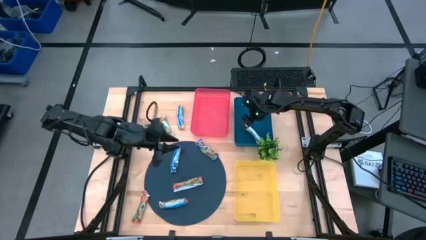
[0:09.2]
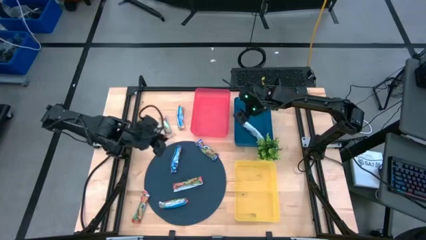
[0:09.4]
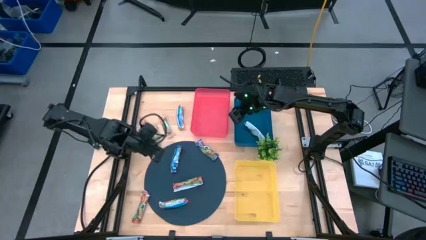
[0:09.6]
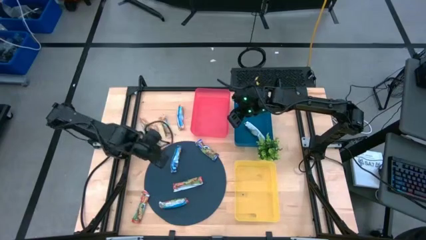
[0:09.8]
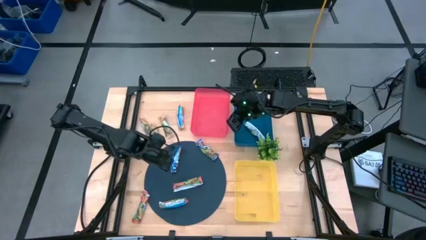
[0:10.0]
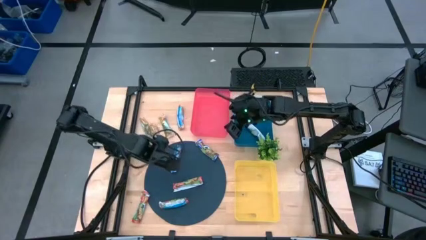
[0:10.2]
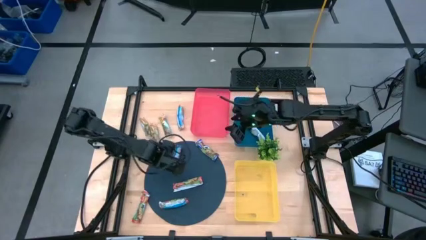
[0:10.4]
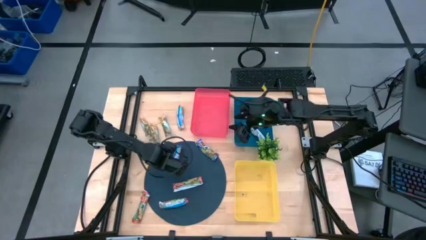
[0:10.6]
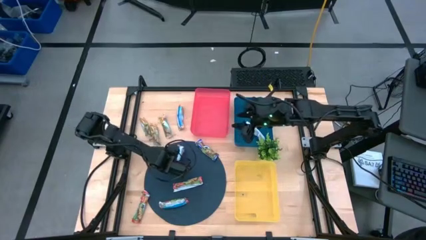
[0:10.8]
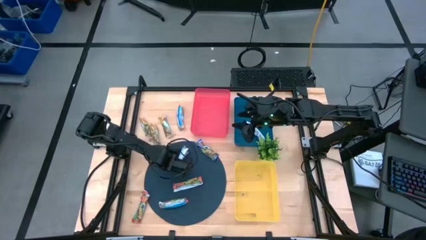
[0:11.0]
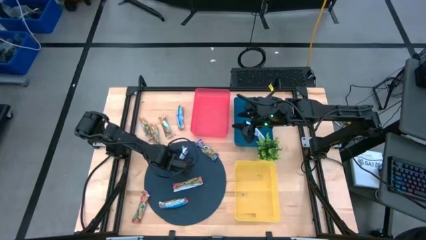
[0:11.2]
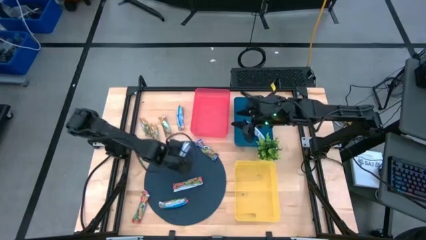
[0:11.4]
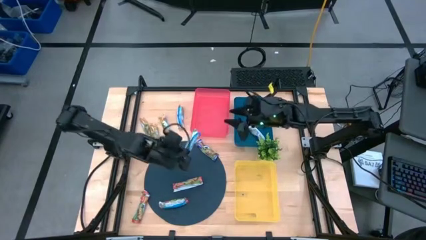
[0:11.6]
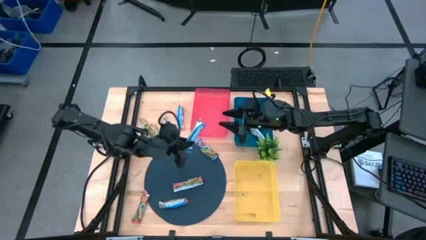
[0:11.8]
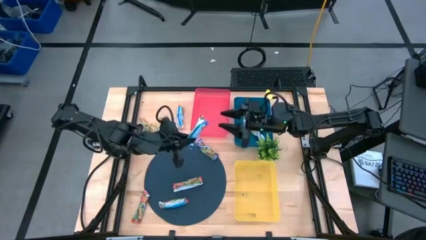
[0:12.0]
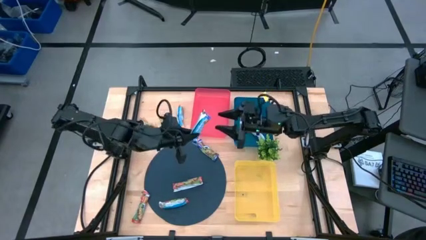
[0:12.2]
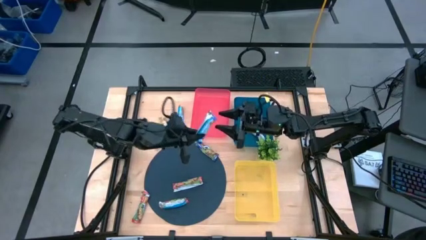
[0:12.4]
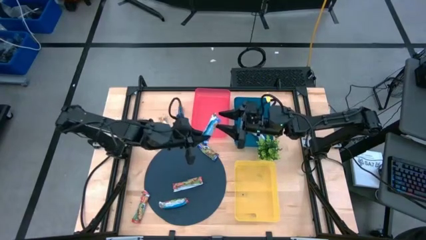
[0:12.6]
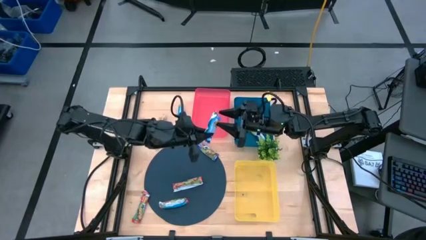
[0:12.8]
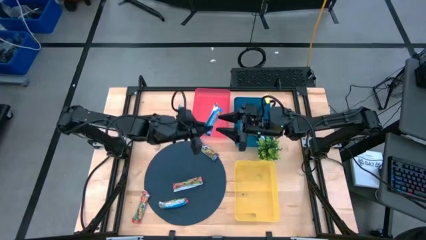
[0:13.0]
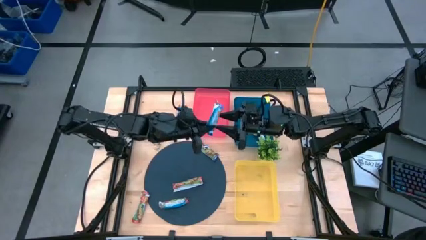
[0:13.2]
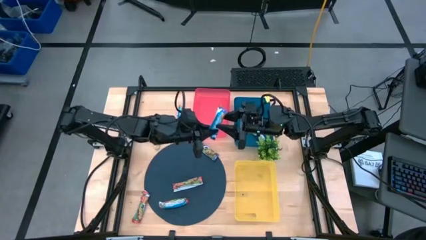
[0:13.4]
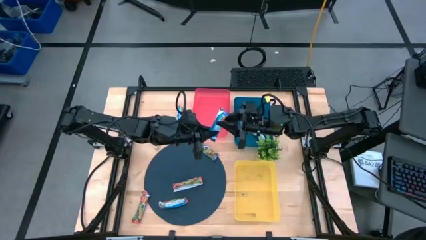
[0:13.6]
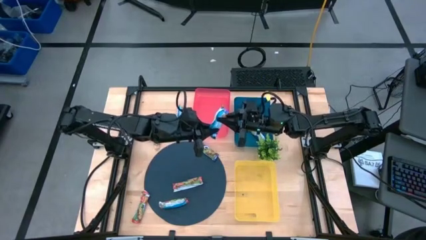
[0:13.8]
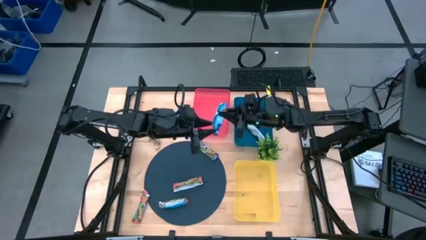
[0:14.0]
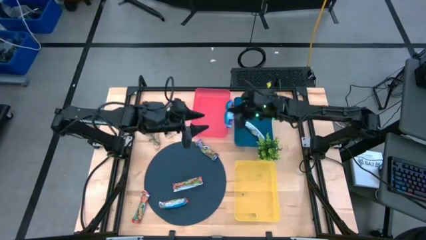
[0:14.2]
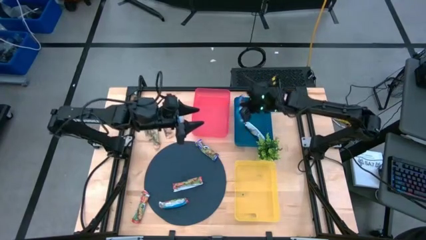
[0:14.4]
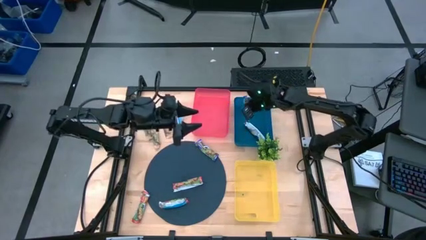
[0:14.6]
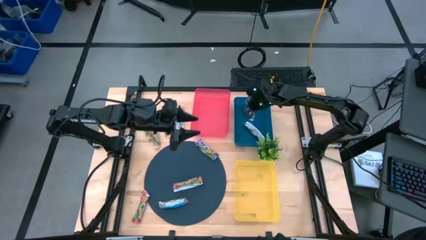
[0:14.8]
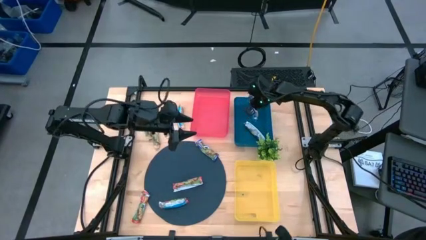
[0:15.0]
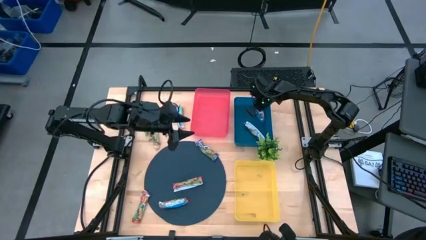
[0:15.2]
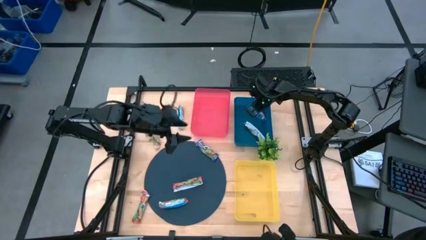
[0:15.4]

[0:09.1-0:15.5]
Task: Pick and place Granola Bars by type
Put the blue granola bar into the blue bin

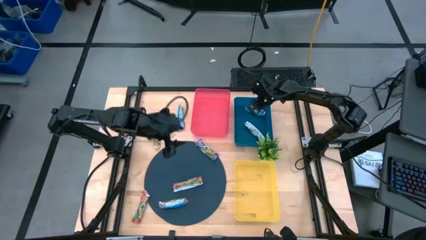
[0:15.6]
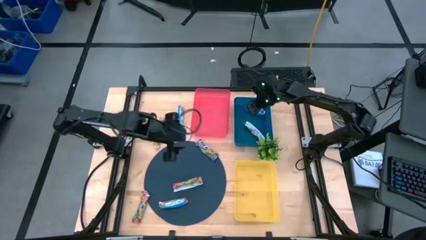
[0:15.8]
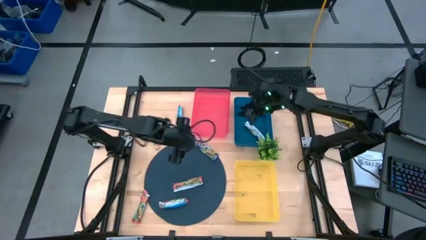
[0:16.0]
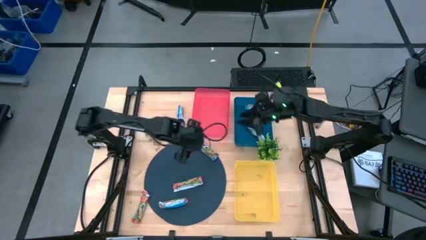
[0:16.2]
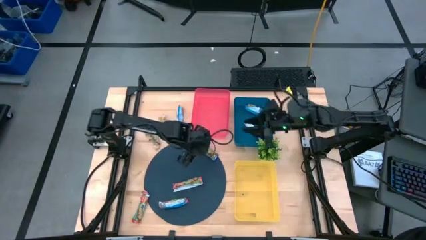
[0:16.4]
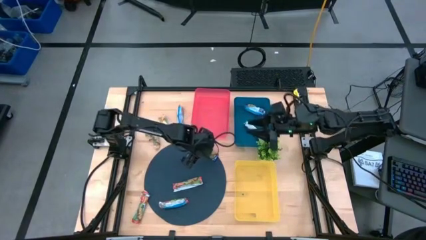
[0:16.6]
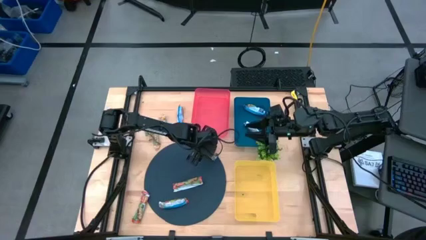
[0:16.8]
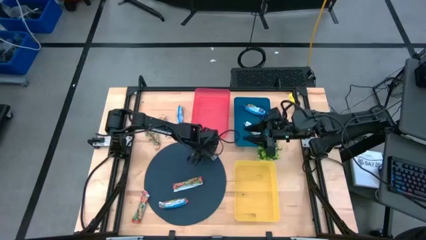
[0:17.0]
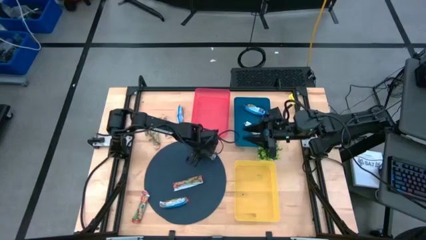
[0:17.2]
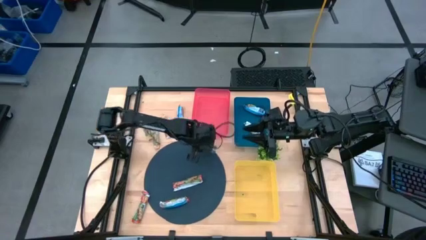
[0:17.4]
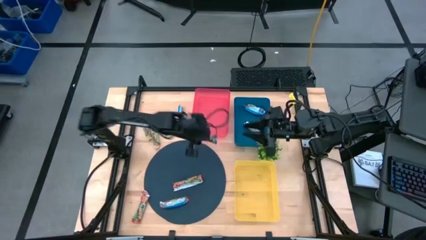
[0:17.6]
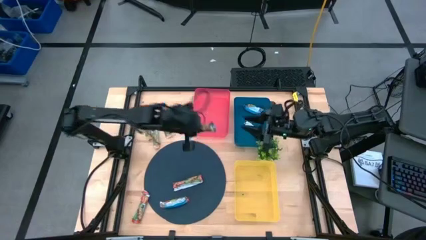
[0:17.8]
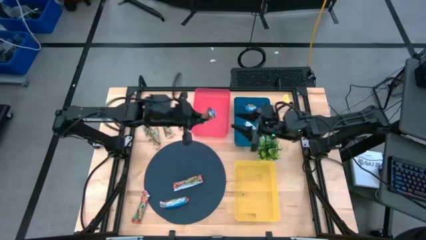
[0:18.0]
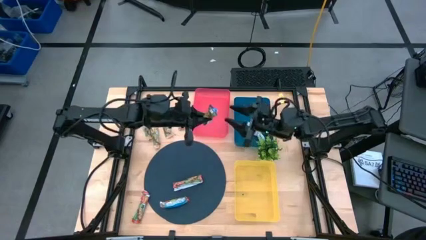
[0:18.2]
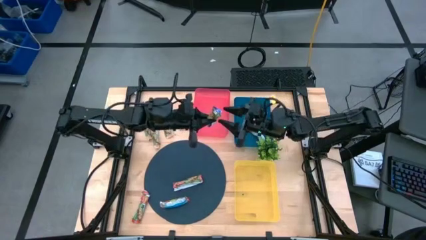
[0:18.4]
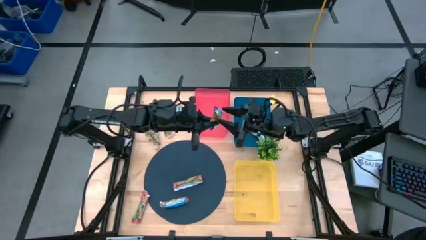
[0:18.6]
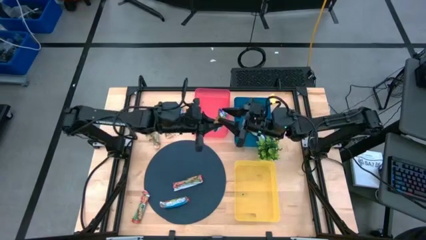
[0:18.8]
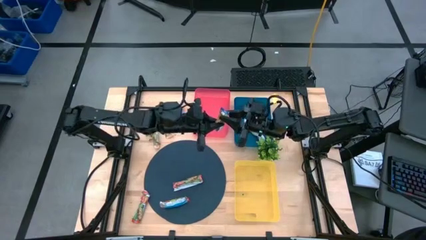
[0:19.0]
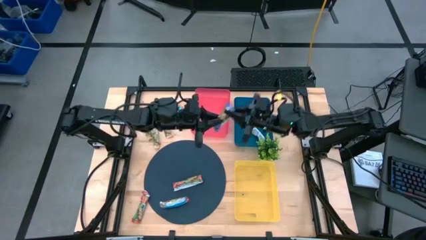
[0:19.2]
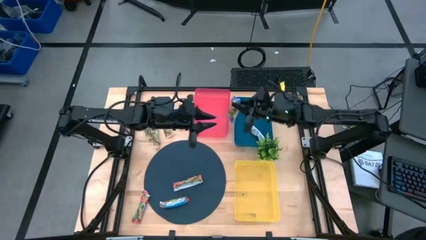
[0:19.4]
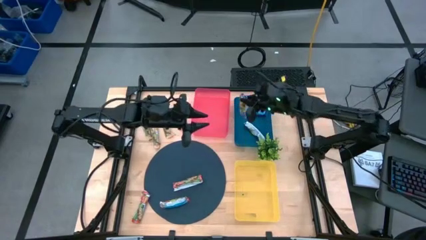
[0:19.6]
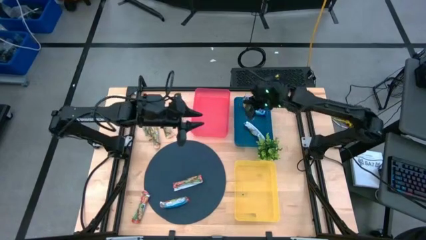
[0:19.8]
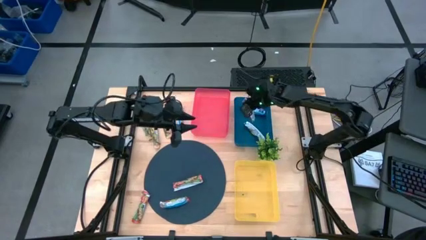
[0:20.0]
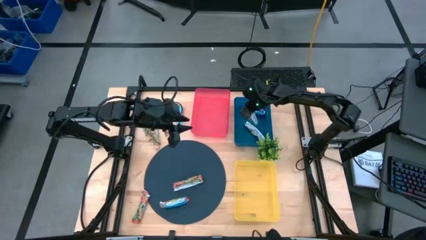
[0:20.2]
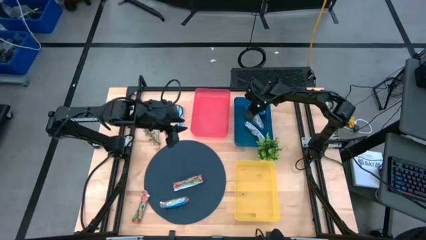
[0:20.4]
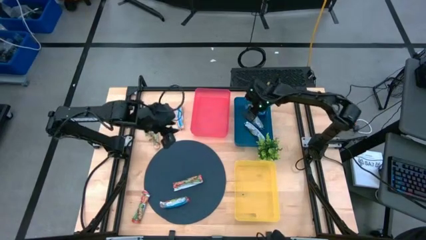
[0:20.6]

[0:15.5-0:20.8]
Put the blue granola bar into the blue bin

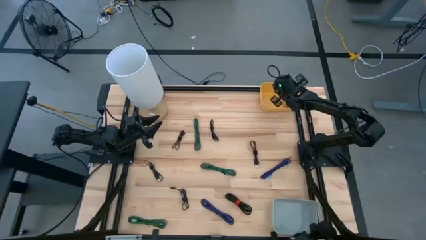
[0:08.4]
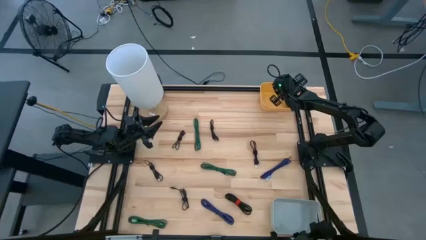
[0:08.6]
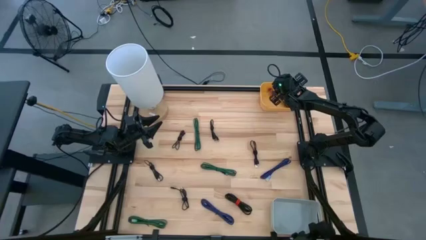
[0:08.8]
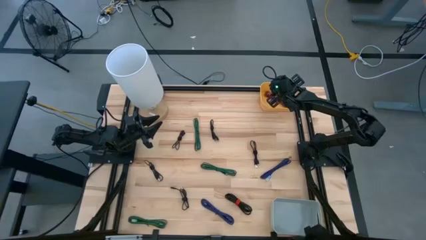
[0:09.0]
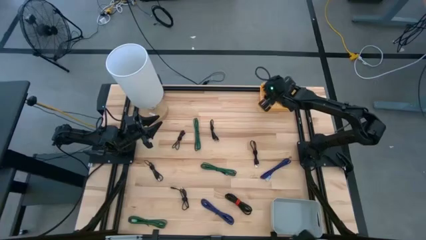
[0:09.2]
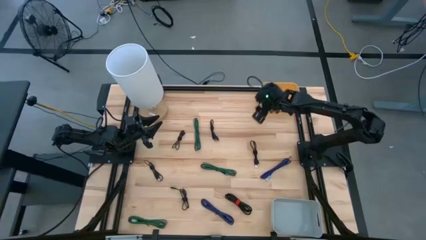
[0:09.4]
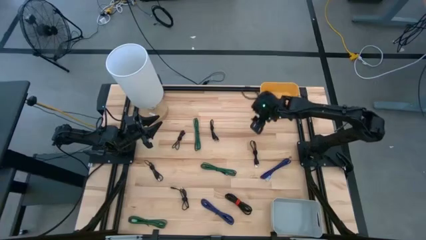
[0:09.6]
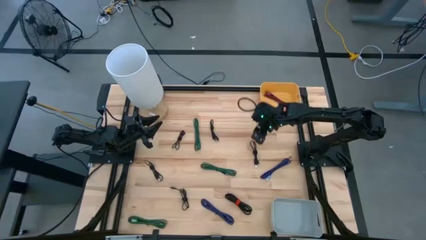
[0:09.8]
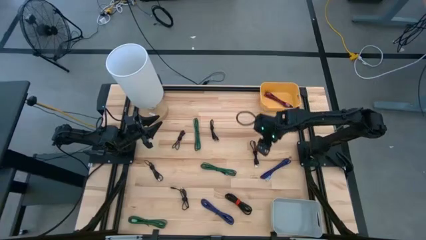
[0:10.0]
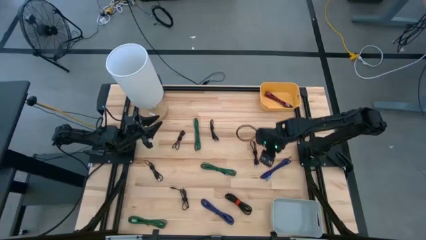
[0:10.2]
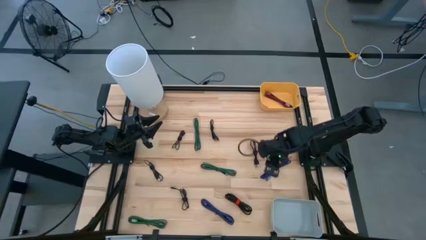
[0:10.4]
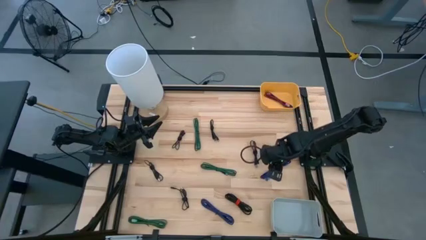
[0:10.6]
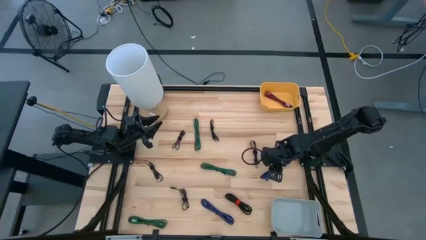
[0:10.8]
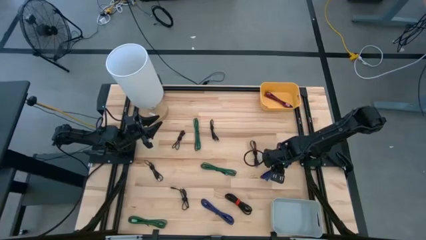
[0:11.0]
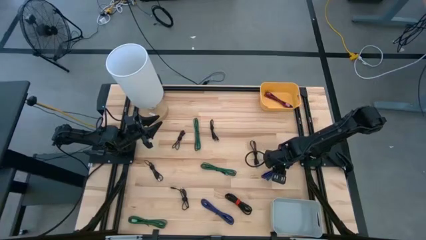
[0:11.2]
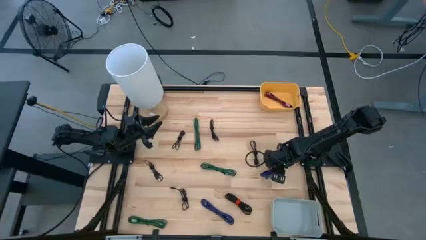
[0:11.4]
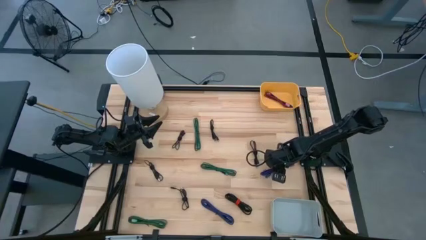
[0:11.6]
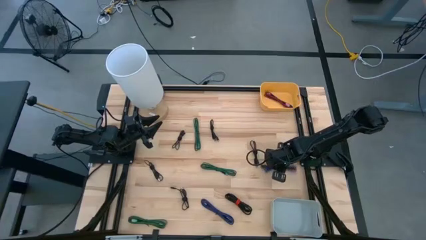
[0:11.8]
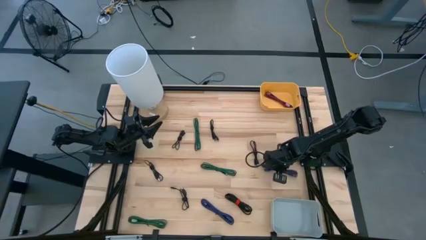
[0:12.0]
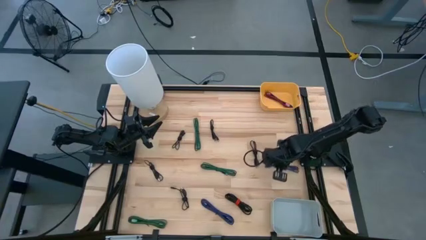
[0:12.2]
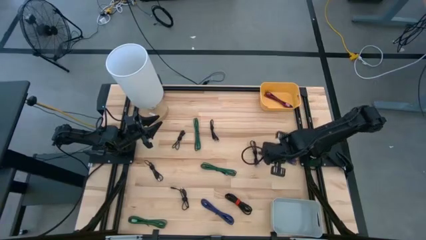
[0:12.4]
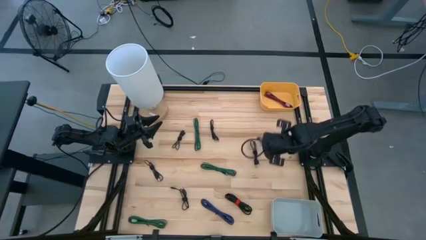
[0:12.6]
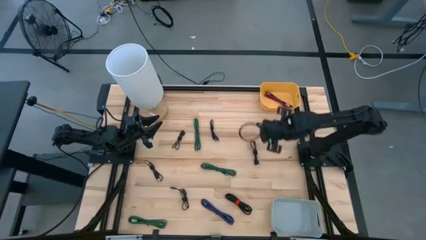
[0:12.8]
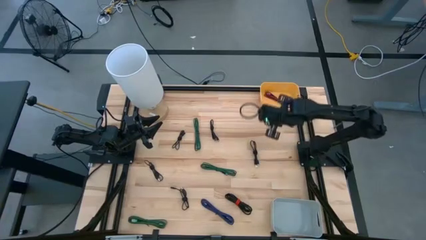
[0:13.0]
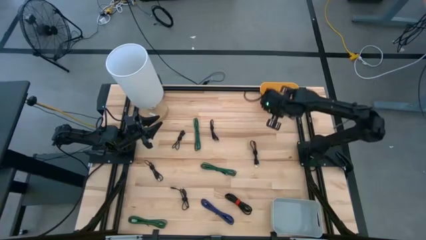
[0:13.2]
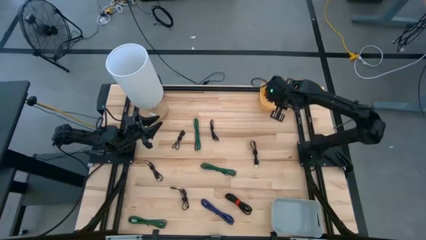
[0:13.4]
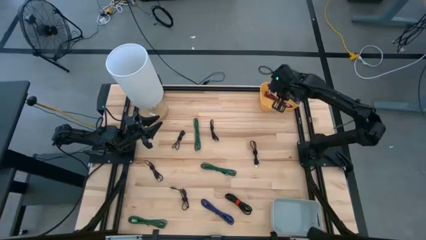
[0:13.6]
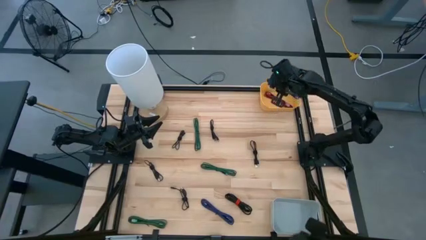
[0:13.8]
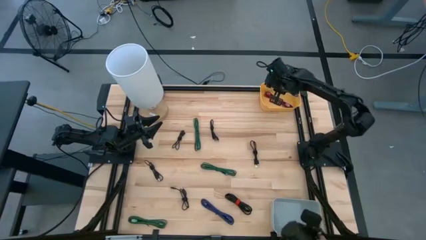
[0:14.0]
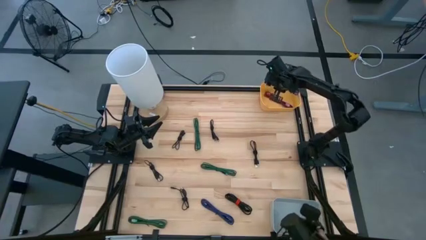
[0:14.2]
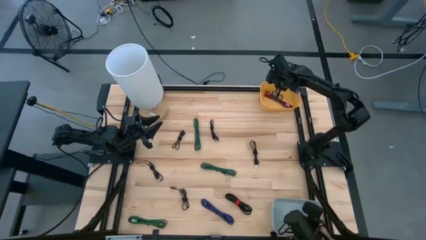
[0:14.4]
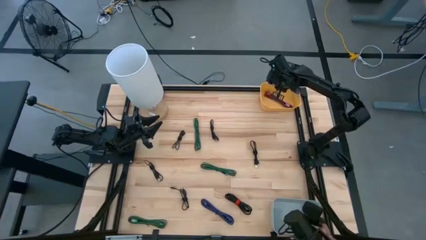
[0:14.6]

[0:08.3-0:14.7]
Task: Pick & Place USB Port
Put the black and blue USB cable into the yellow bin
